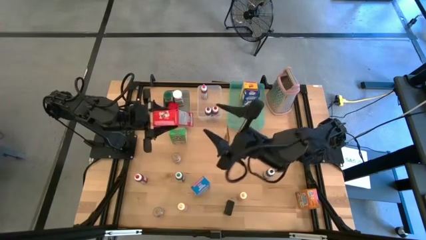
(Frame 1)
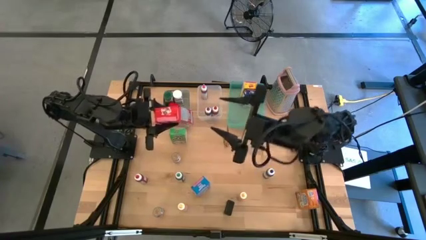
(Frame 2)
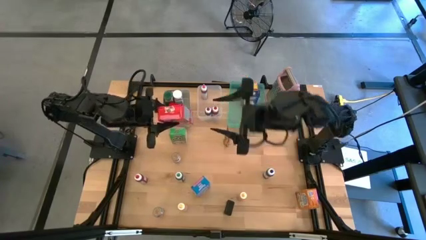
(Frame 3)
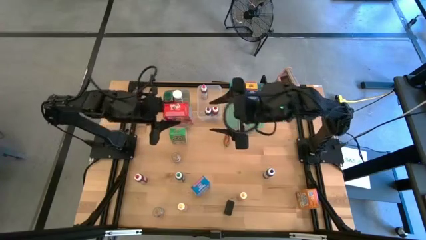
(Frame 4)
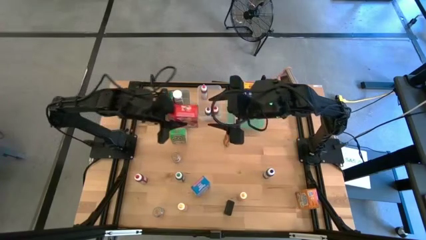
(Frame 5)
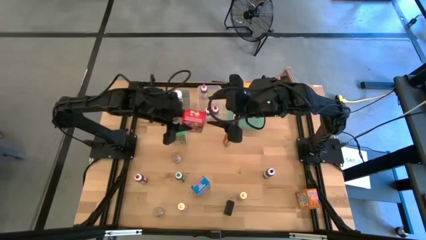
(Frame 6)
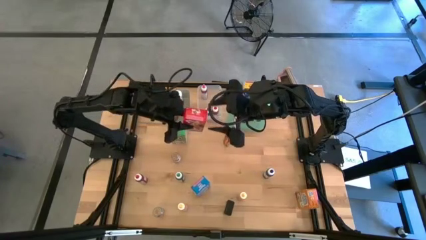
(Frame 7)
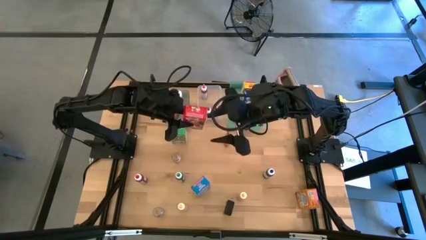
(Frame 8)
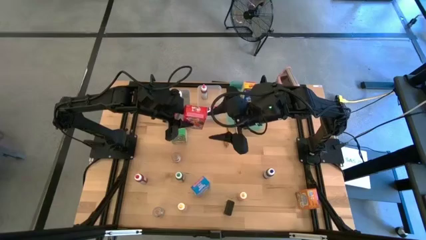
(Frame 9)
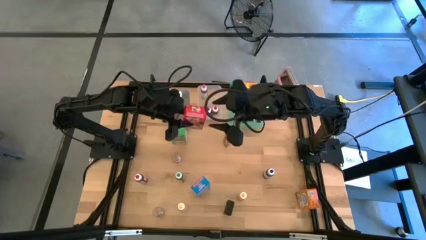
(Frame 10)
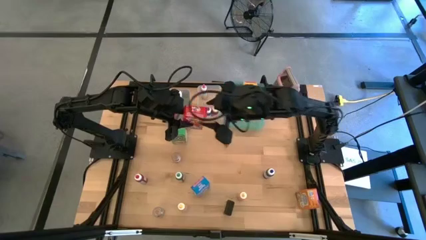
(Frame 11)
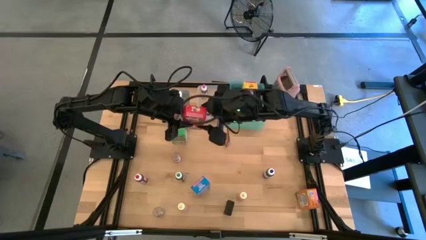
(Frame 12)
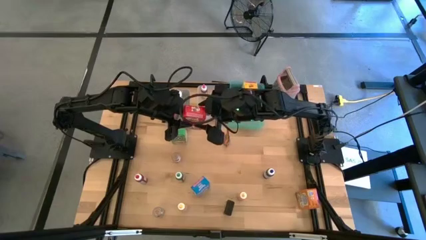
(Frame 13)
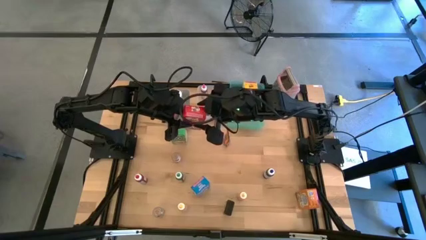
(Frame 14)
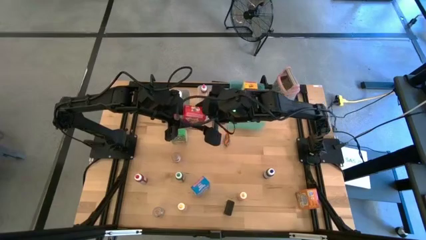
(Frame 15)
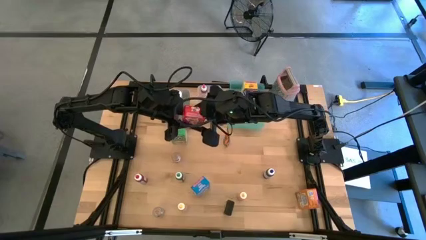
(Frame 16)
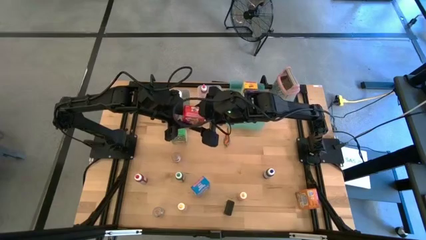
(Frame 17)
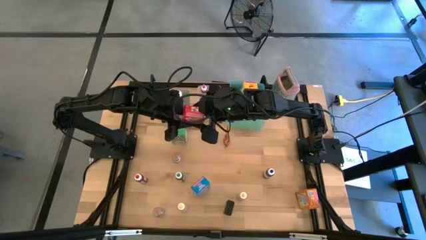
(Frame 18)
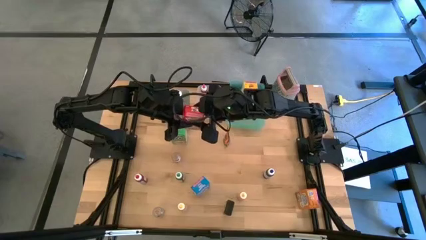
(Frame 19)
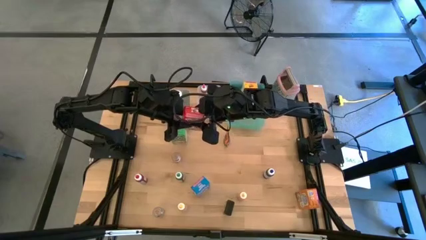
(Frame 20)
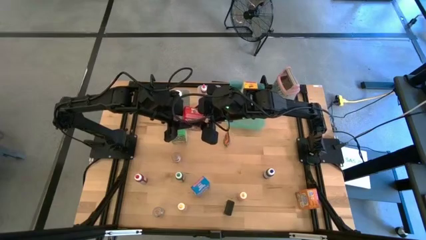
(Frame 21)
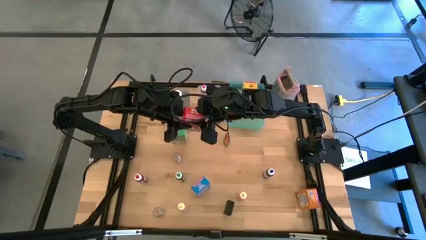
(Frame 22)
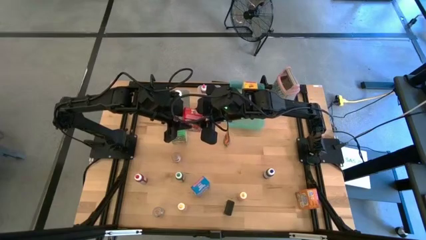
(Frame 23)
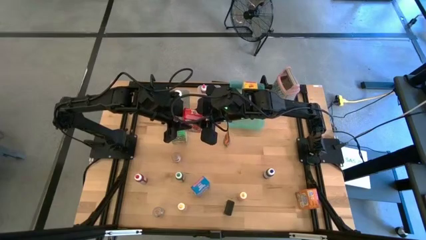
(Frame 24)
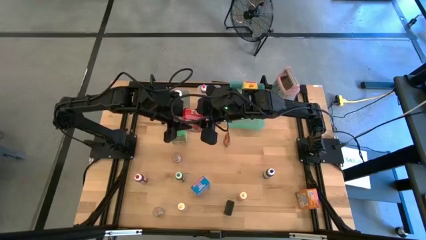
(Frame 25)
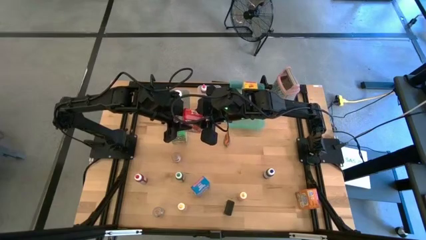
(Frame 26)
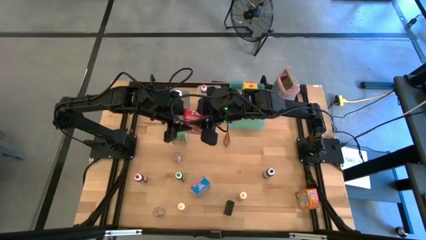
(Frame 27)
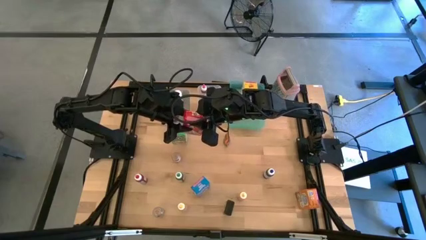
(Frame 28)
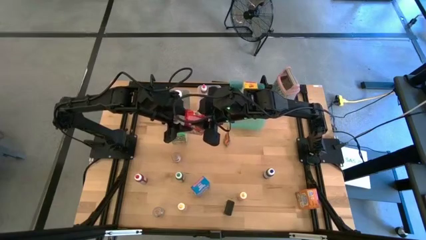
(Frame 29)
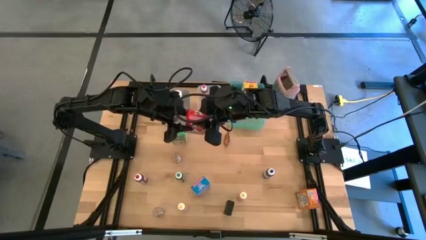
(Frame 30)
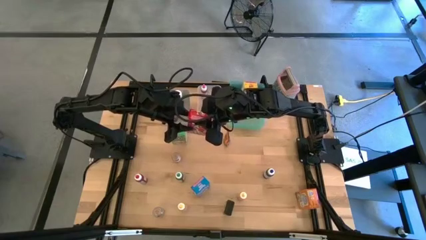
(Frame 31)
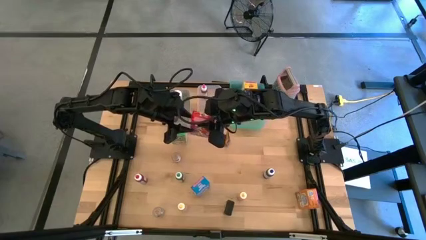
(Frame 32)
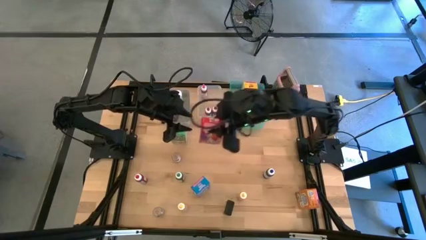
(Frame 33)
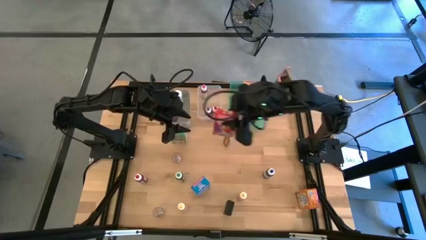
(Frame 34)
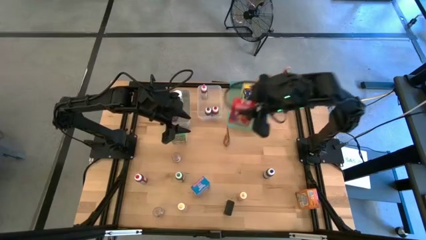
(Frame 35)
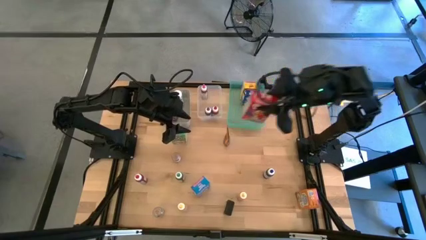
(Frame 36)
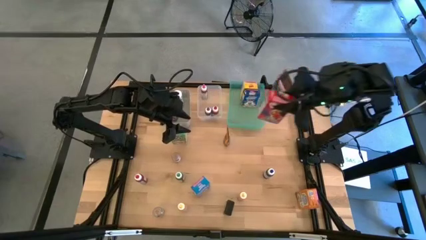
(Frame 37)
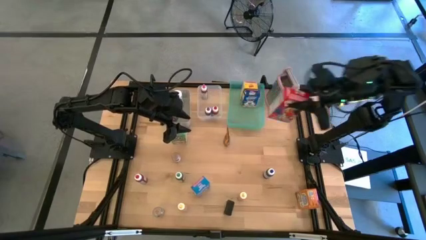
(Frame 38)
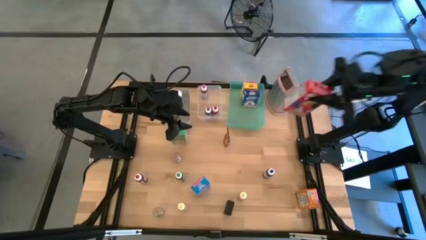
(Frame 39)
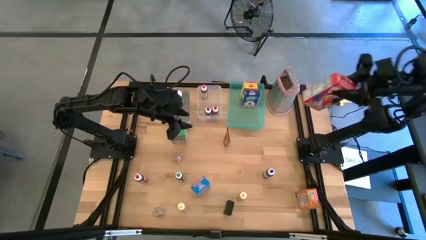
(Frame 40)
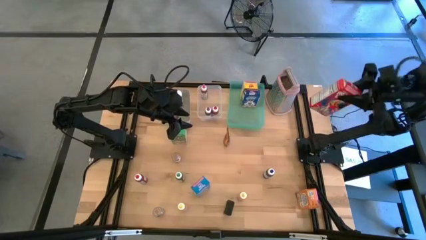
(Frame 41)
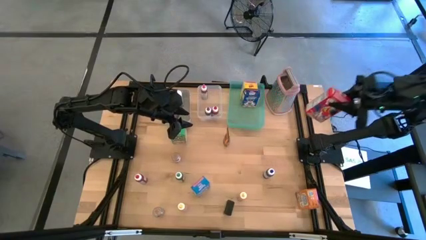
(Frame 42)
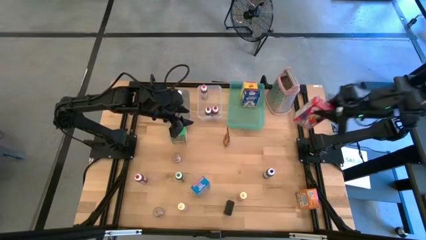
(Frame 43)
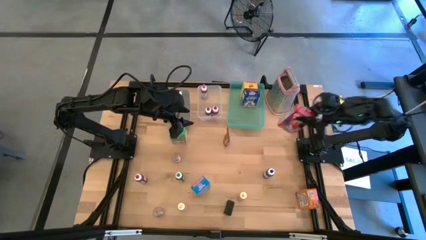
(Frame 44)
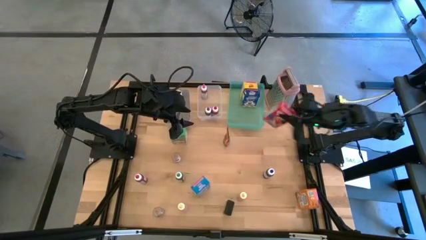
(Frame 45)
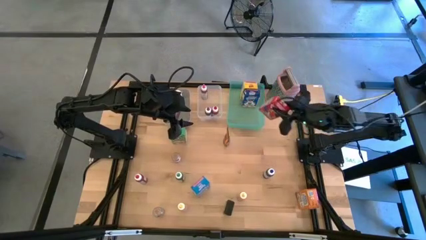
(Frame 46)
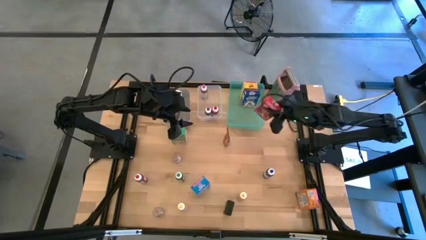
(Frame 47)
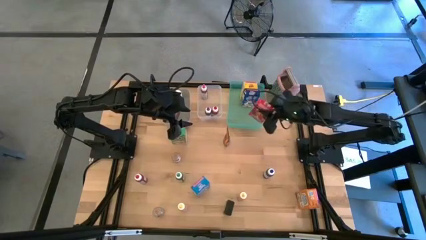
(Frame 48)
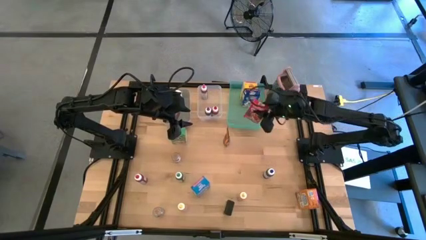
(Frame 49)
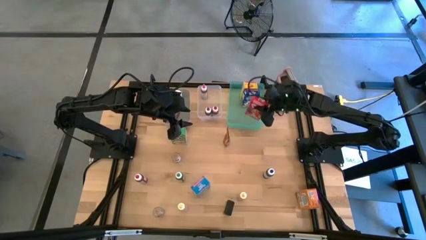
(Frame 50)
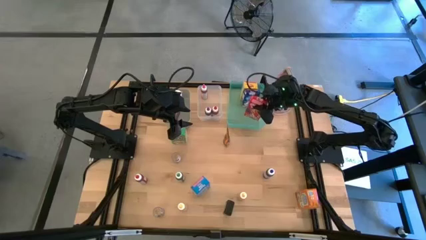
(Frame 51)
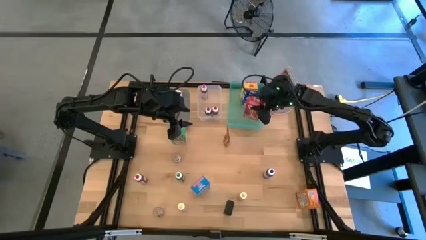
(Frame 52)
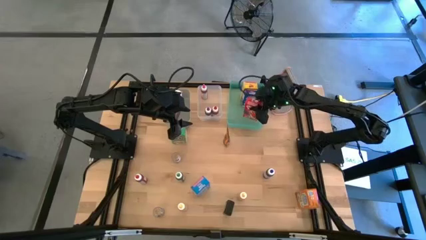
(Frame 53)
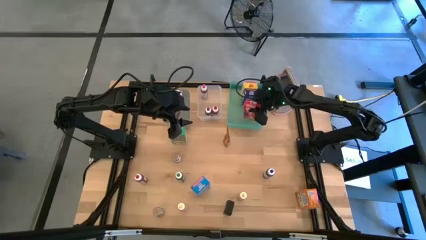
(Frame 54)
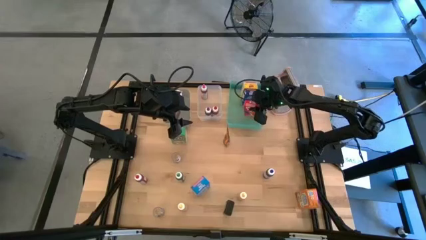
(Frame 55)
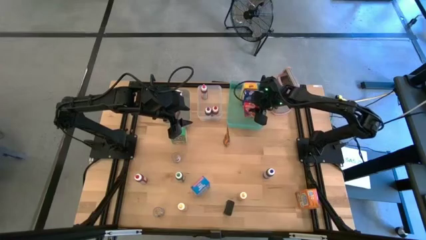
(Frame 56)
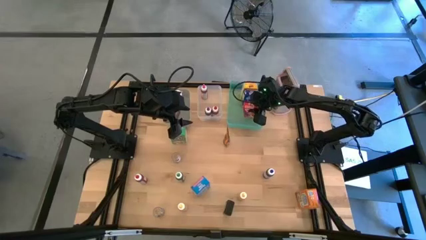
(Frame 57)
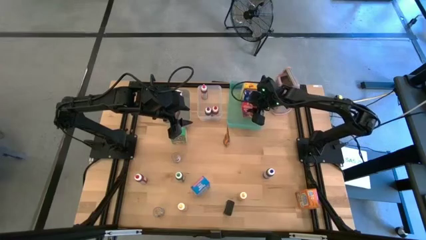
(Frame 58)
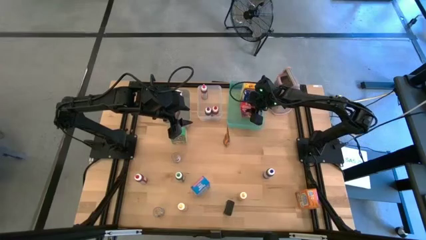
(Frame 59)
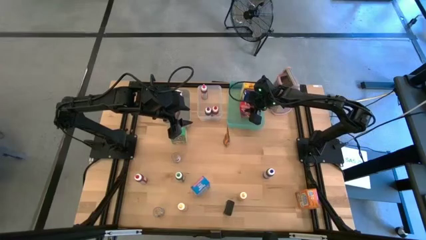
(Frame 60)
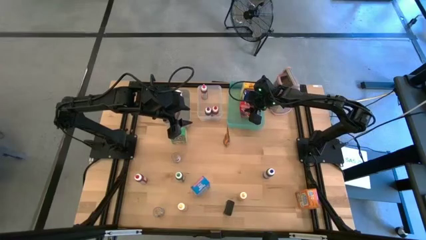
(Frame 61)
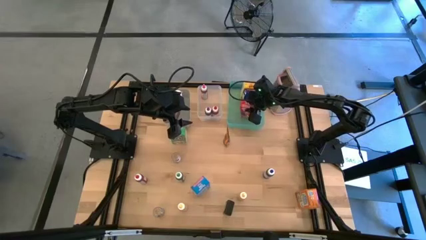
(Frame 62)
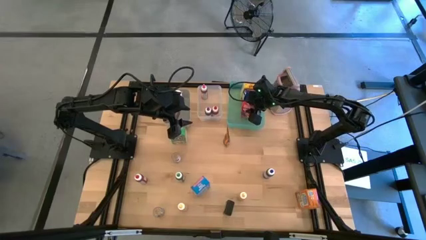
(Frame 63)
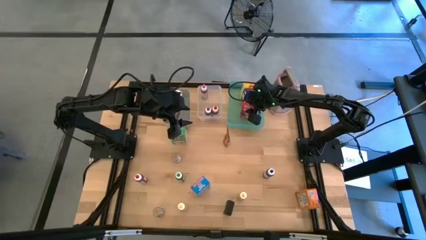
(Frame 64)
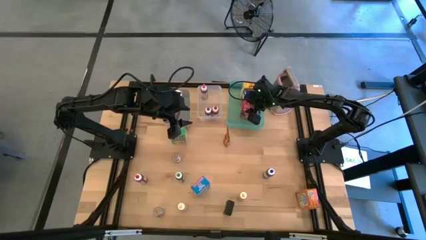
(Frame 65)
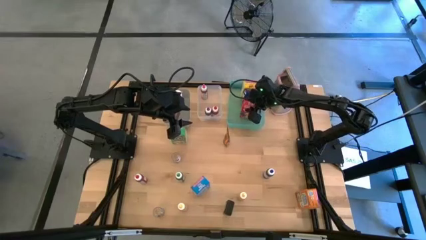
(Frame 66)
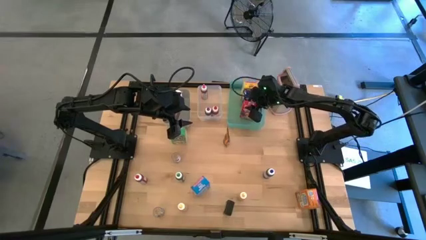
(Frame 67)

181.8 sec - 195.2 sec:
Task: Pick & Place Kitchen Items
Put the red cereal box into the green bin

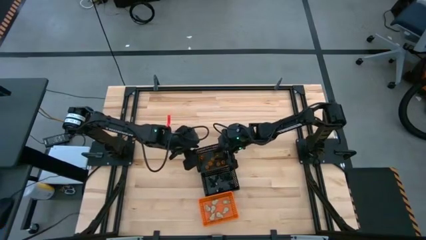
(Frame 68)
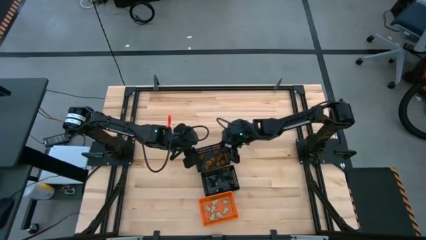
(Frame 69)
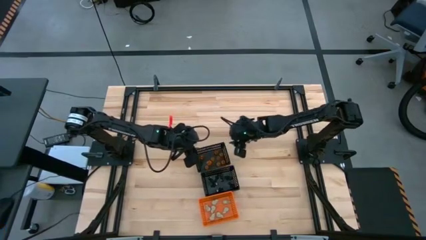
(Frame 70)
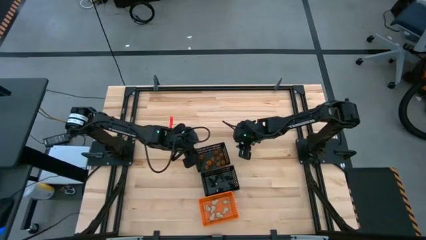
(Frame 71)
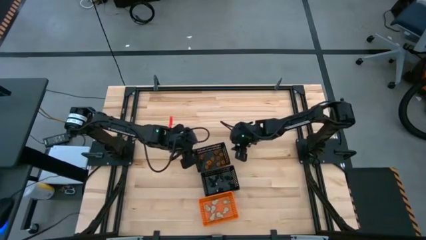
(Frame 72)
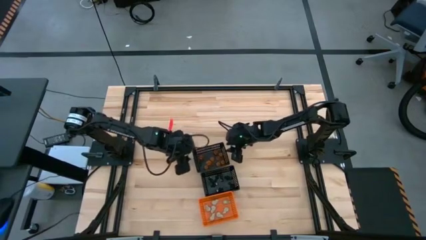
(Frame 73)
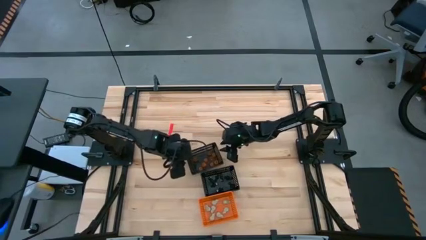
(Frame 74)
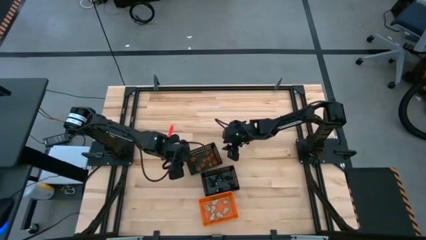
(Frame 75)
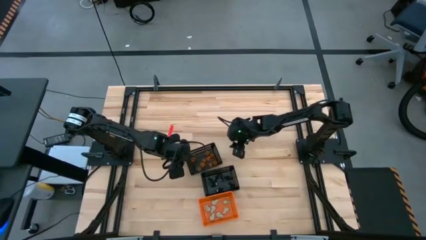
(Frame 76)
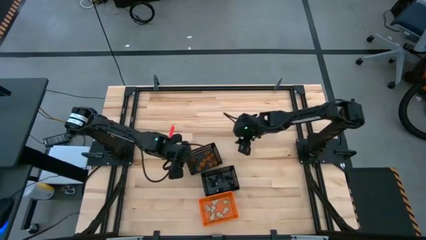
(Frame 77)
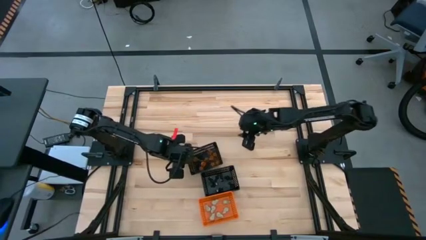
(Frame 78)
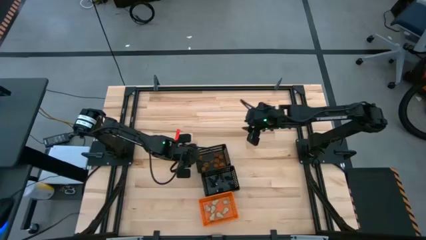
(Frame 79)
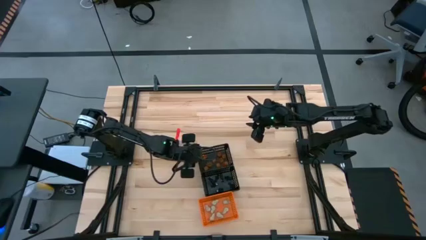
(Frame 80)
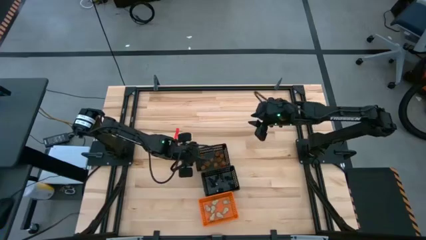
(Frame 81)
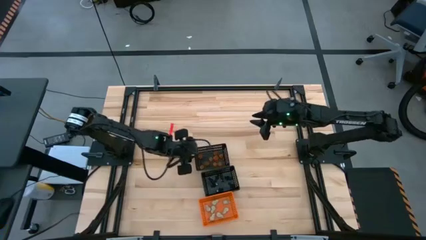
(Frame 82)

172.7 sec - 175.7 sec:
Task: Sort Halloween decoration
Adjust the top black bin on the table
